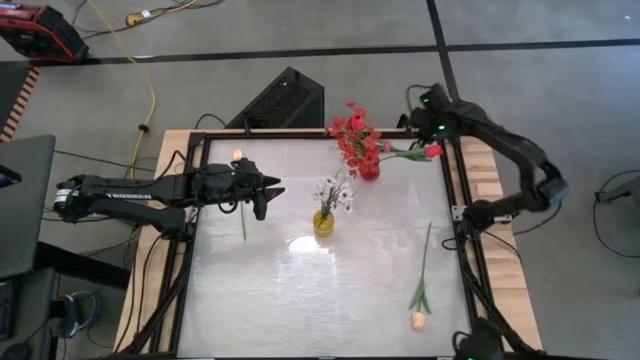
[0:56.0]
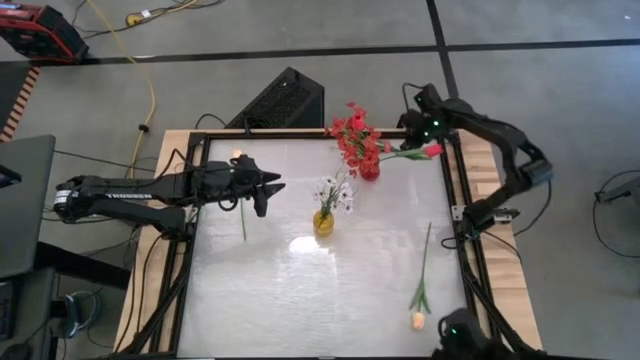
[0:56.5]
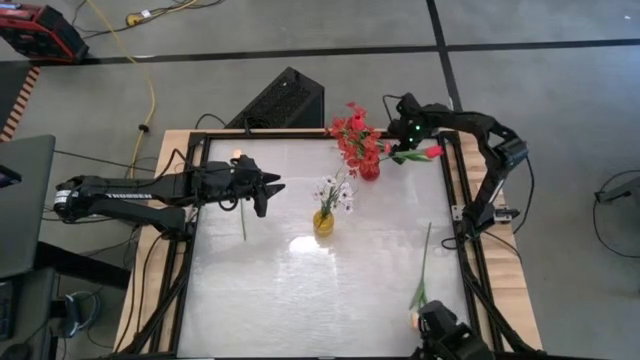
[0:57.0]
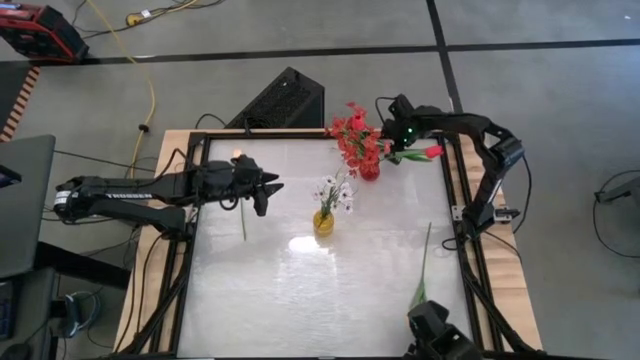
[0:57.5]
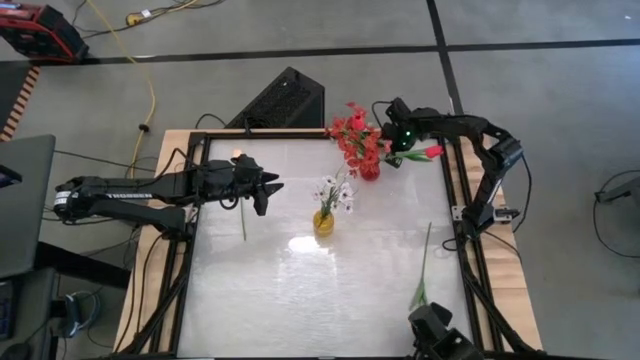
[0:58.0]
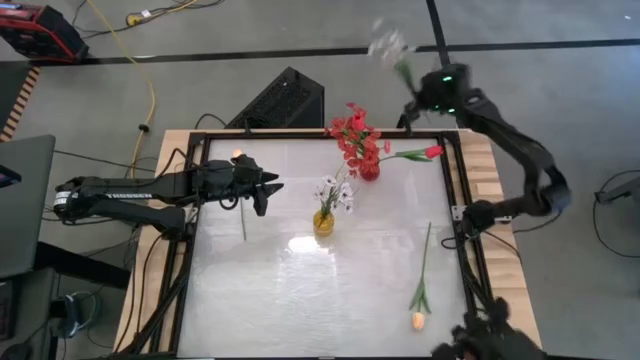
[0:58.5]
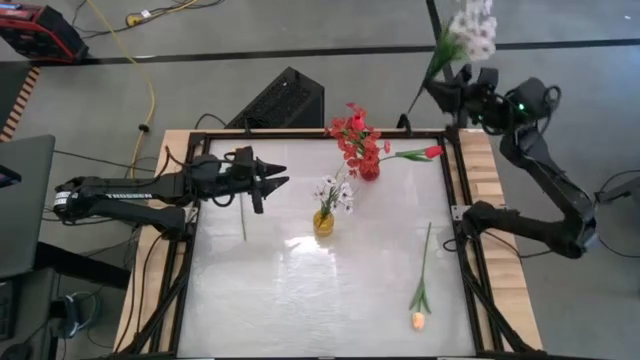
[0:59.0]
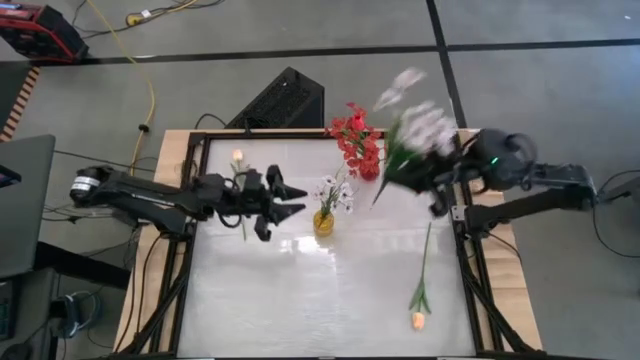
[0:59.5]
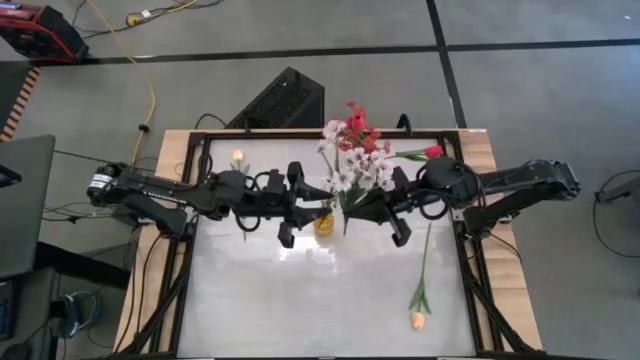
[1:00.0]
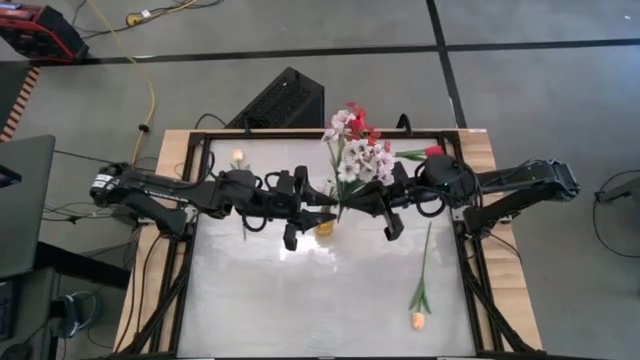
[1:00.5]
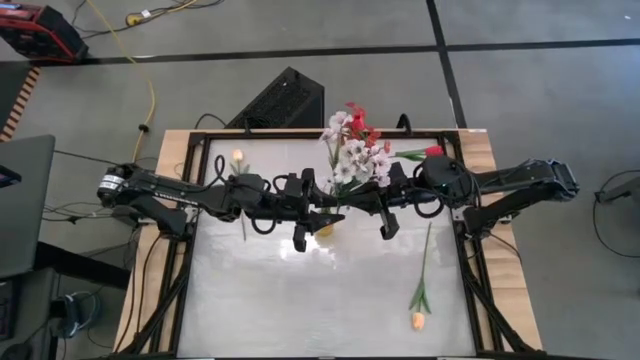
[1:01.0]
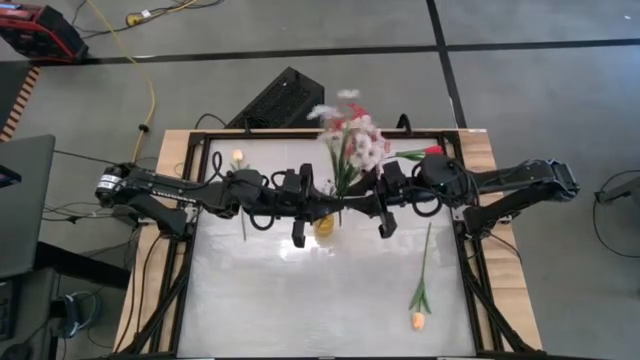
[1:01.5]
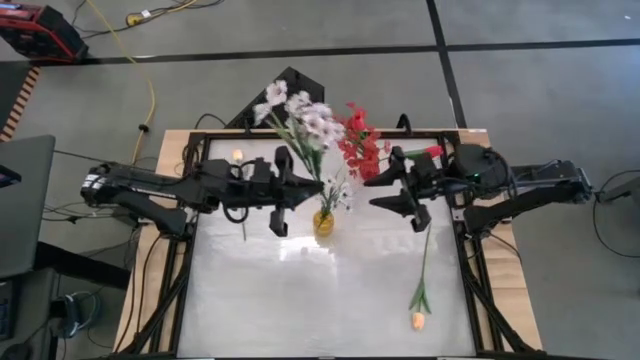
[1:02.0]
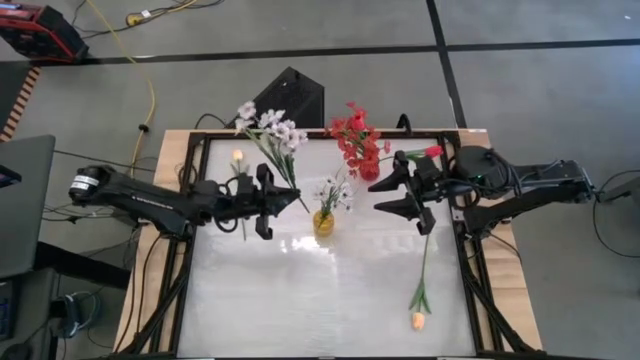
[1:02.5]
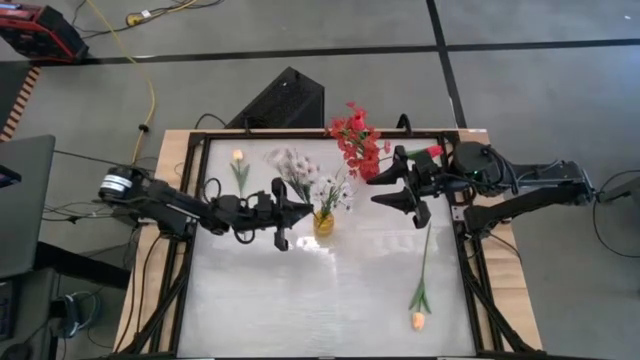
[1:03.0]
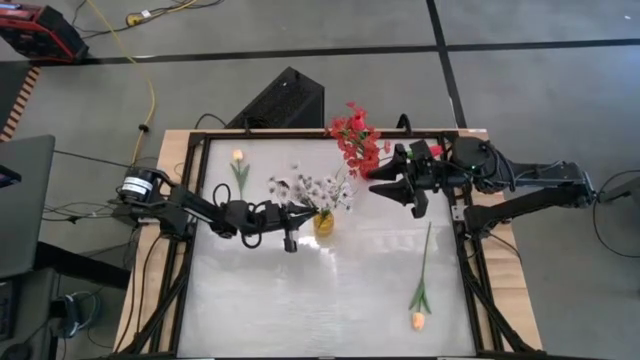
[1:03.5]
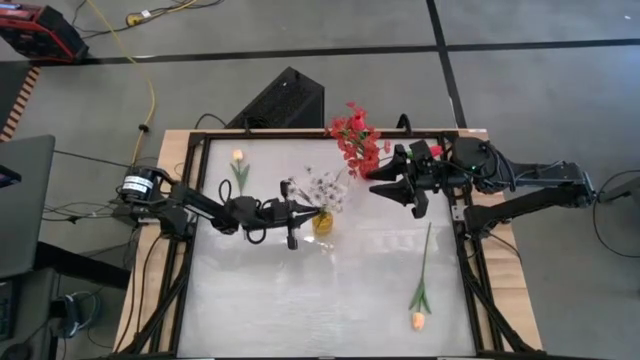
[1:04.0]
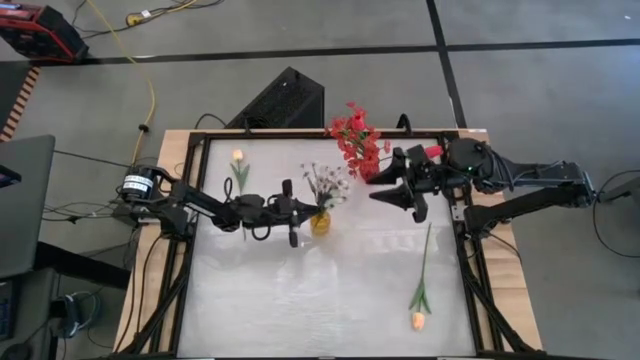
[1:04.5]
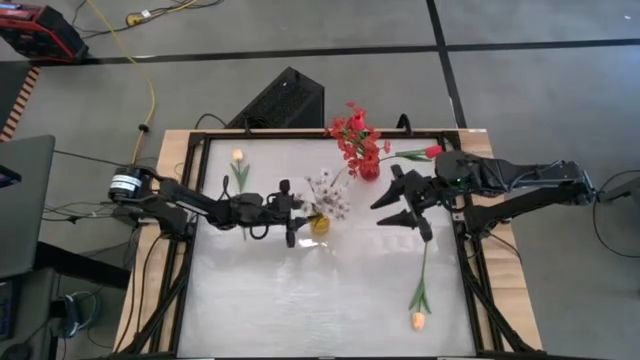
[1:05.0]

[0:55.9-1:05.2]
Task: Sort flowers into vase by color
Put the white flowers into the yellow vase

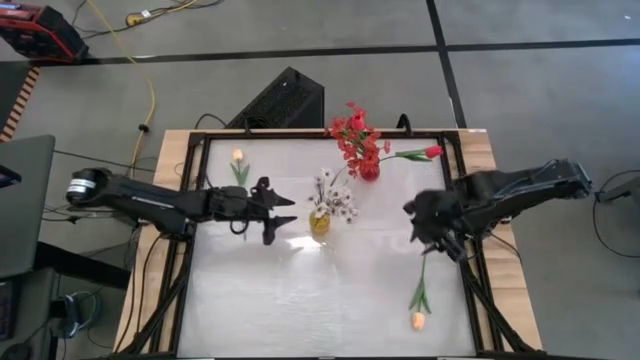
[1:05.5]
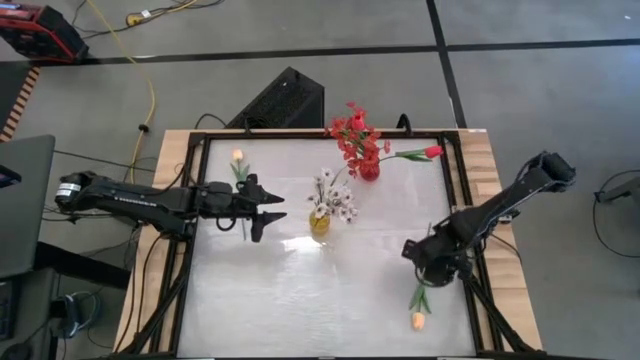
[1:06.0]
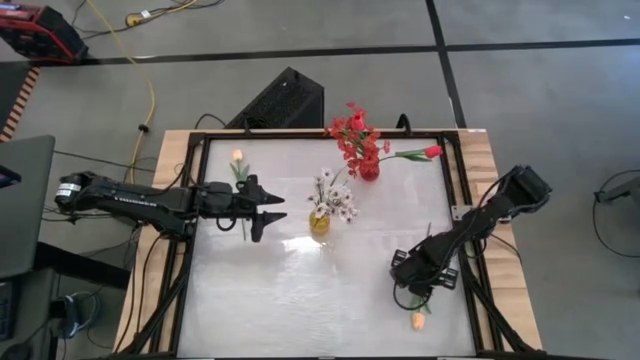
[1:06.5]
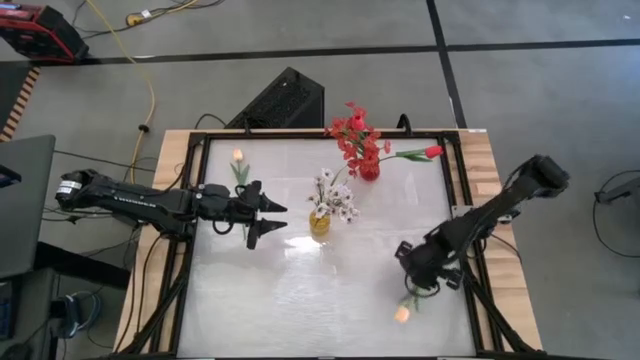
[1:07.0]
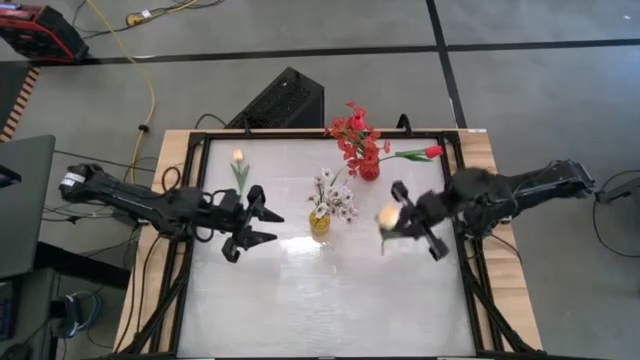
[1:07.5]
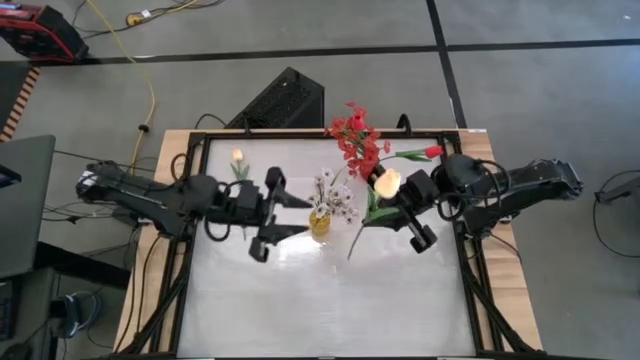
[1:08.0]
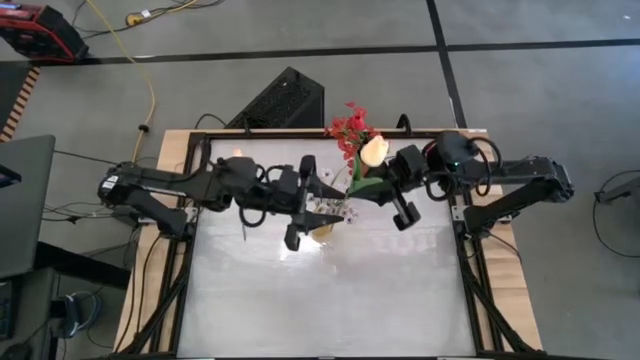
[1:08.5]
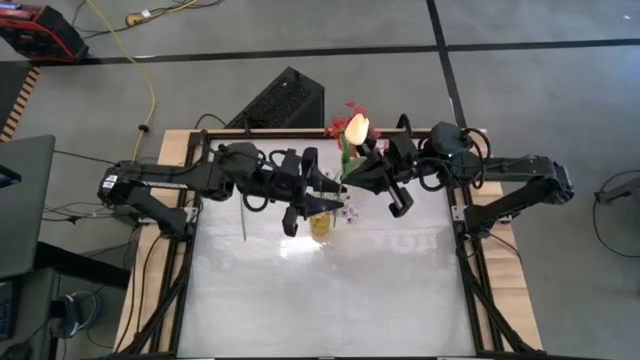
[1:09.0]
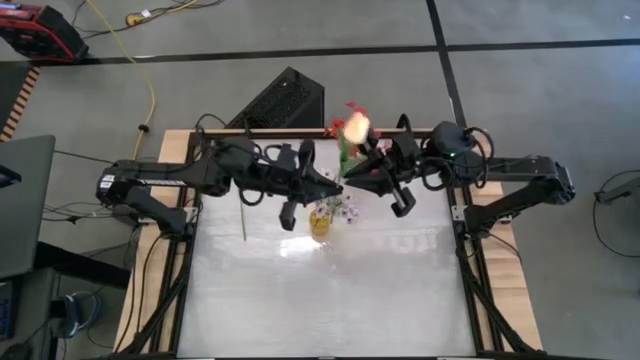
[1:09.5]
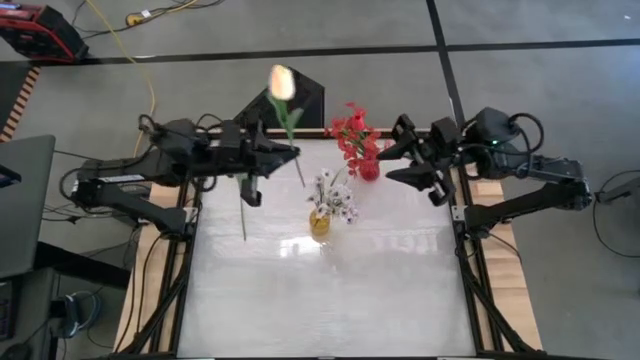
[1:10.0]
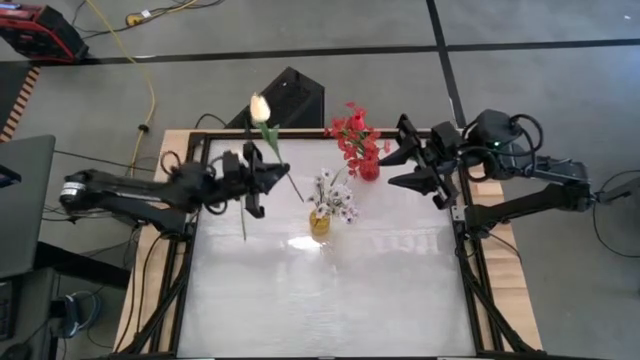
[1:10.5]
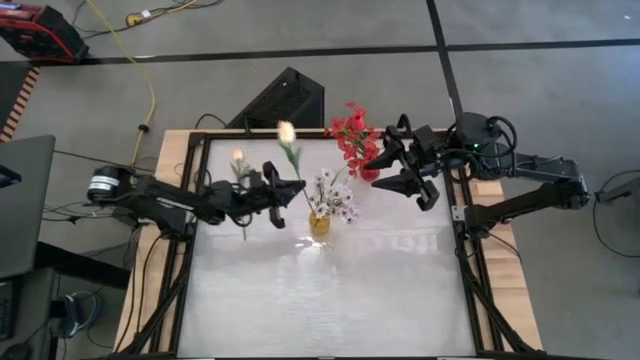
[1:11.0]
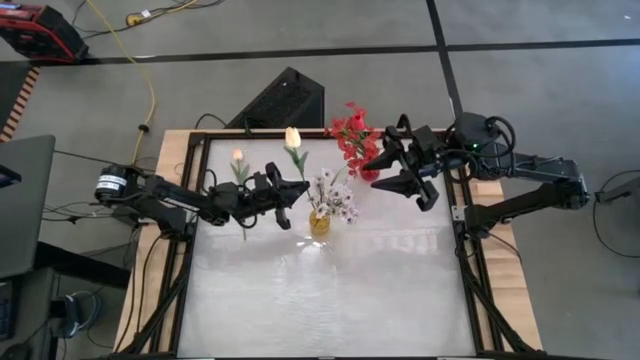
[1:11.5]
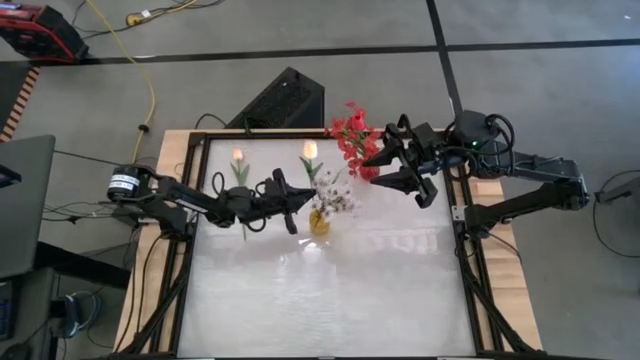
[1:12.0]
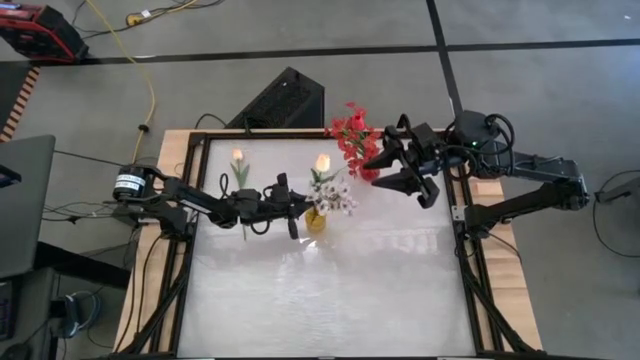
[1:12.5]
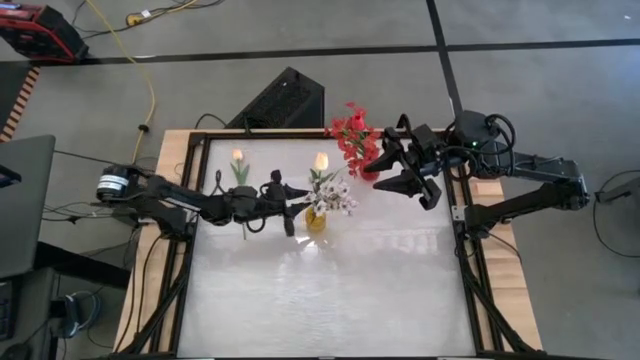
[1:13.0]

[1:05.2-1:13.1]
Put the bottom light white flower into the yellow vase

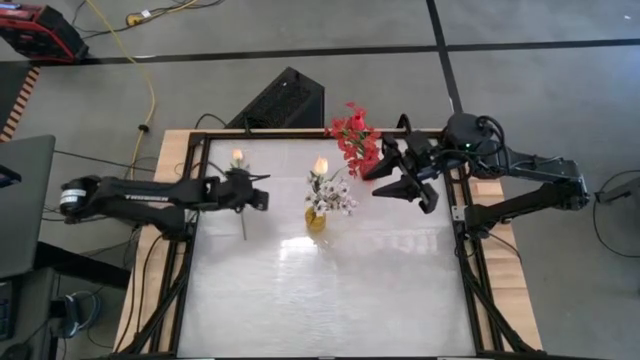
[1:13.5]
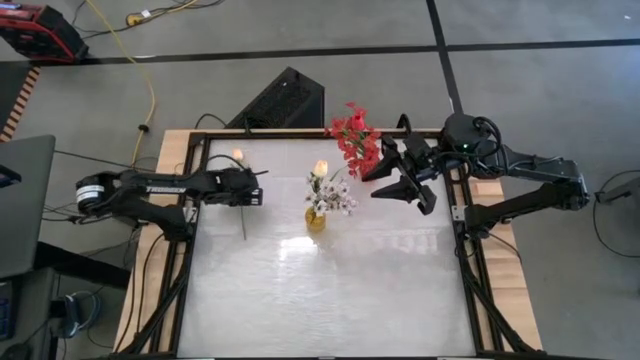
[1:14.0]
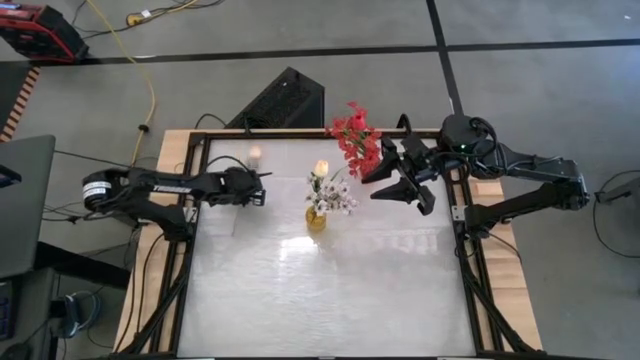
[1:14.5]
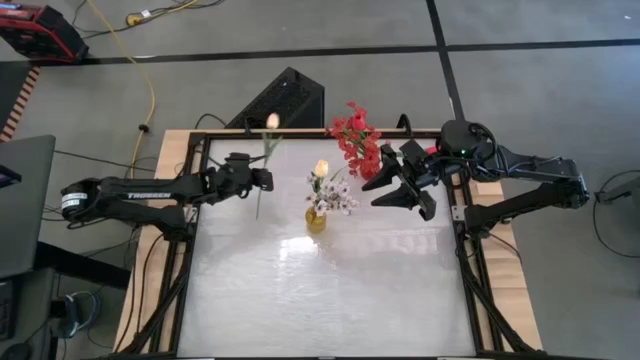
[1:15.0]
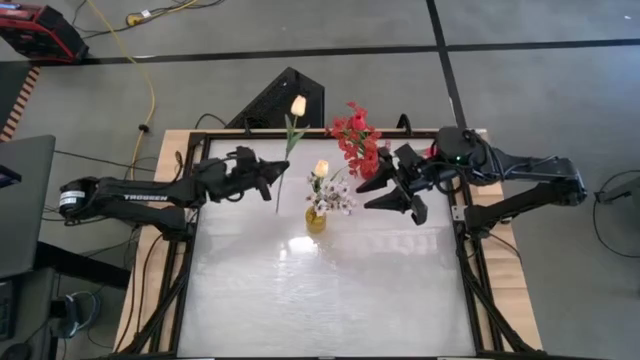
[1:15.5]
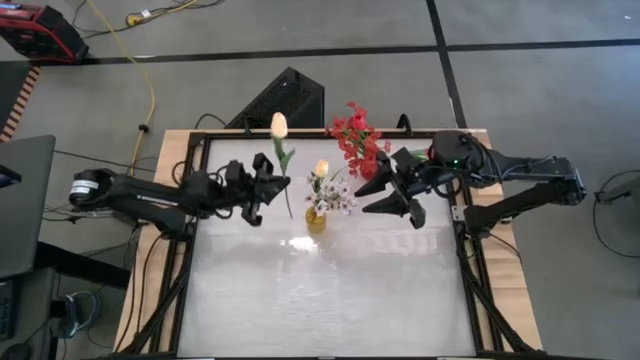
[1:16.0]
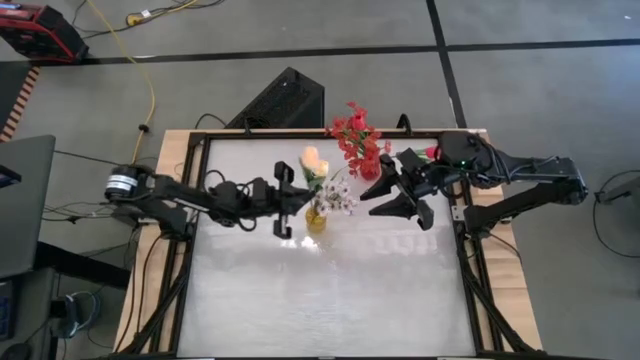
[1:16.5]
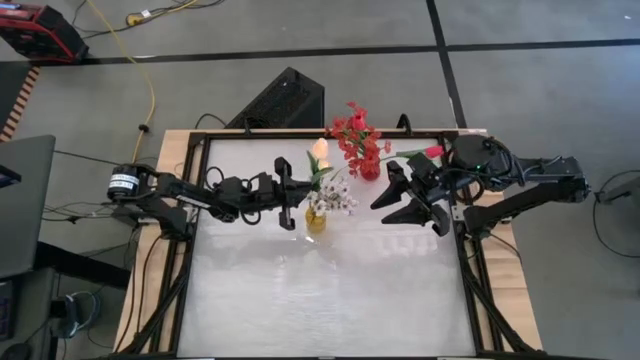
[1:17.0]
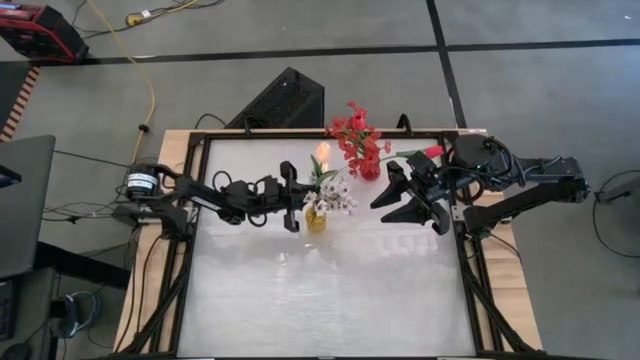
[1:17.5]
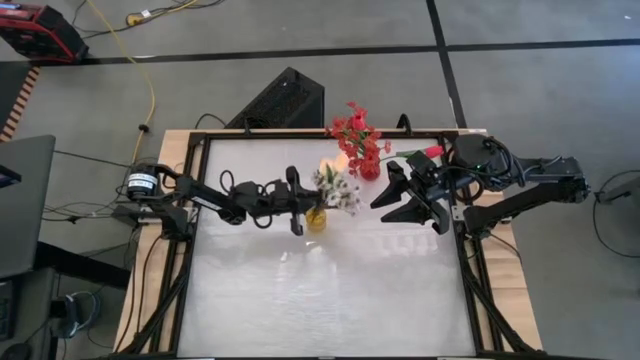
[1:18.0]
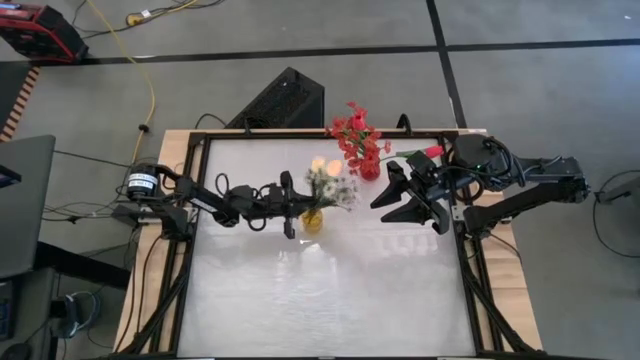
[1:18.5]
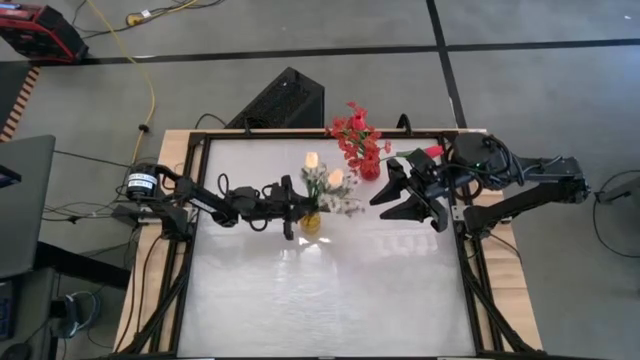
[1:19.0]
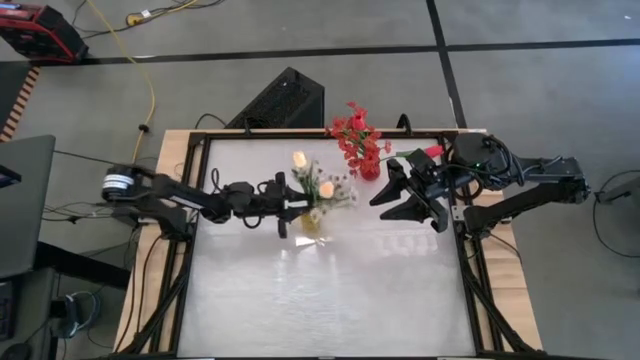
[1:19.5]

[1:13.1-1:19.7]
Put the light white flower into the yellow vase
